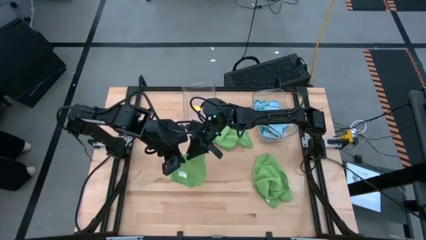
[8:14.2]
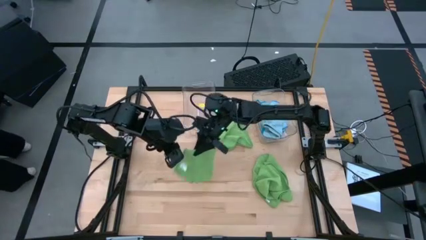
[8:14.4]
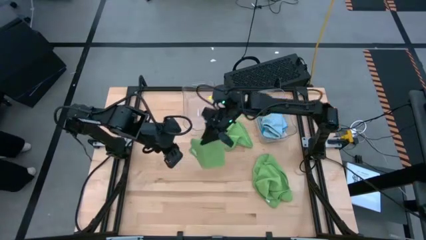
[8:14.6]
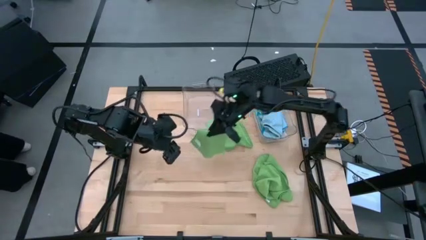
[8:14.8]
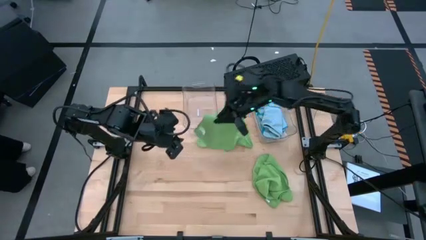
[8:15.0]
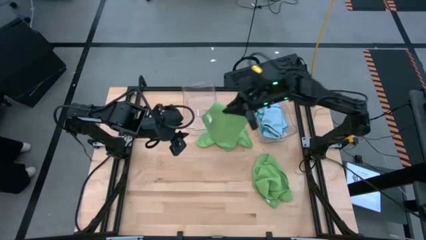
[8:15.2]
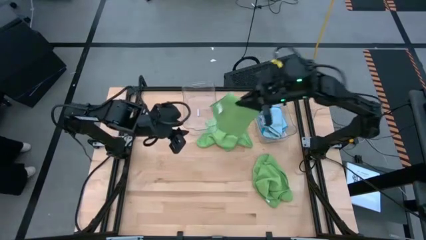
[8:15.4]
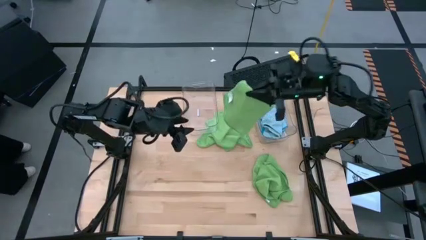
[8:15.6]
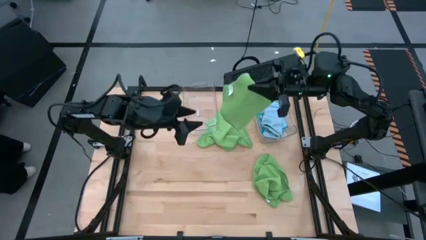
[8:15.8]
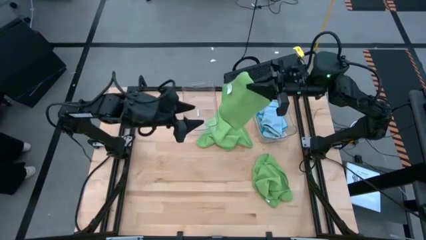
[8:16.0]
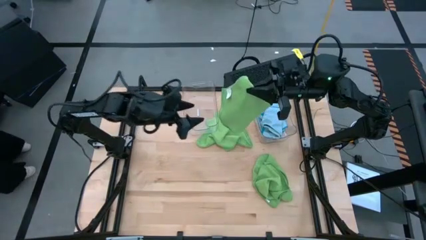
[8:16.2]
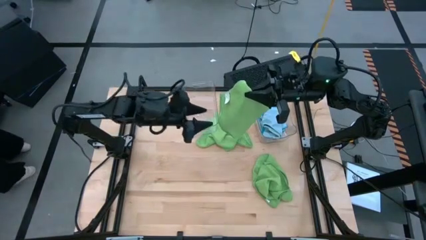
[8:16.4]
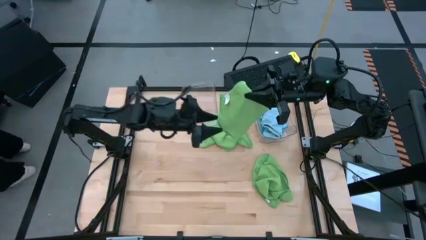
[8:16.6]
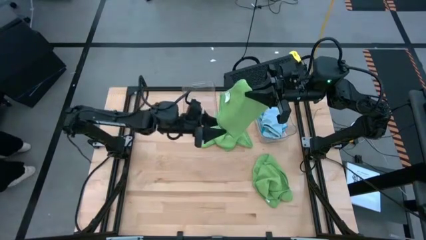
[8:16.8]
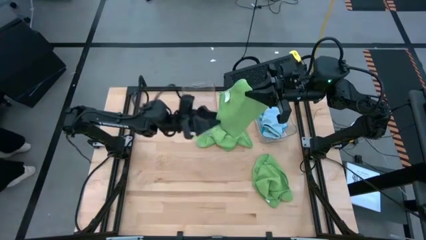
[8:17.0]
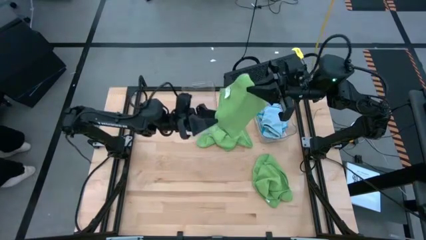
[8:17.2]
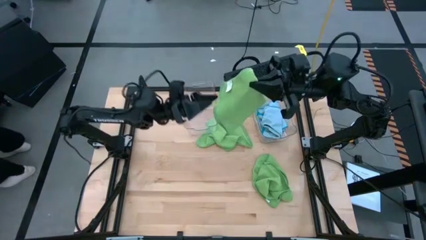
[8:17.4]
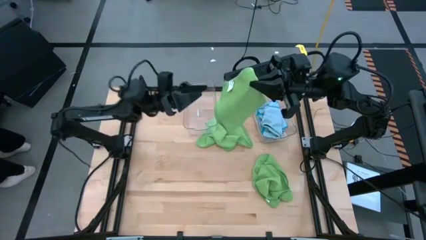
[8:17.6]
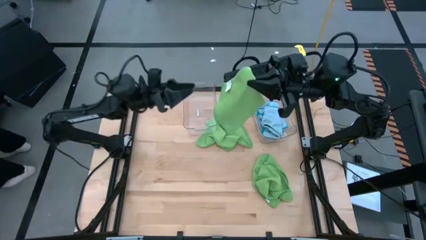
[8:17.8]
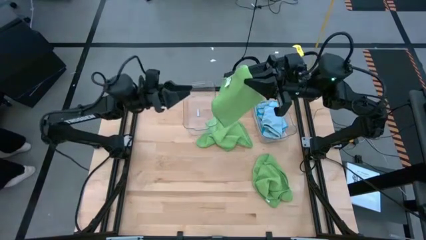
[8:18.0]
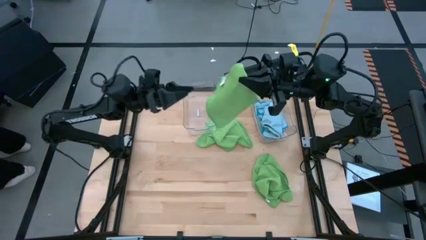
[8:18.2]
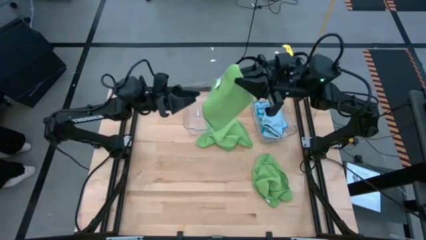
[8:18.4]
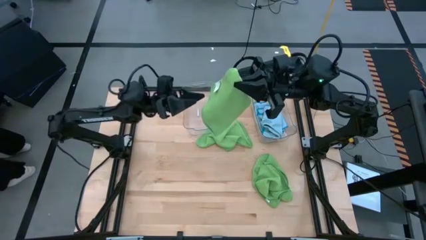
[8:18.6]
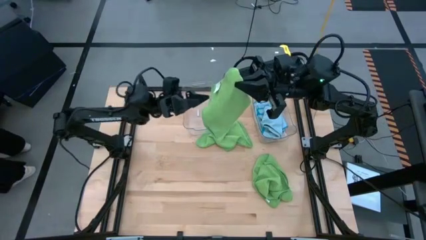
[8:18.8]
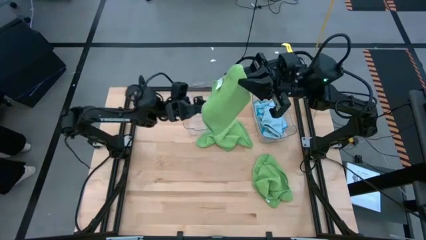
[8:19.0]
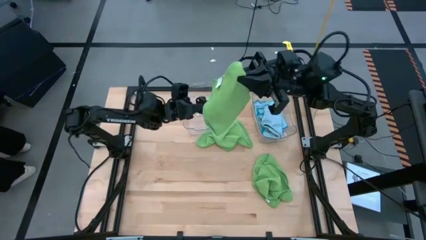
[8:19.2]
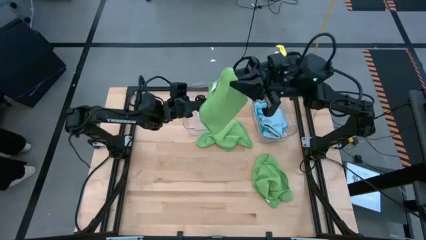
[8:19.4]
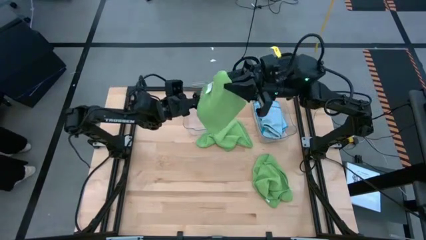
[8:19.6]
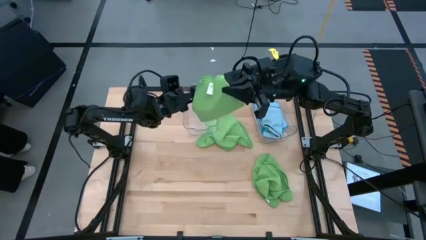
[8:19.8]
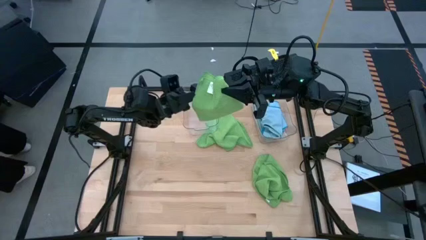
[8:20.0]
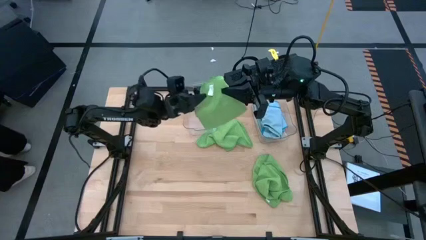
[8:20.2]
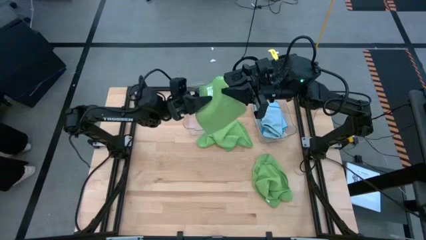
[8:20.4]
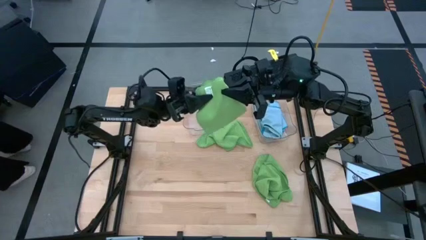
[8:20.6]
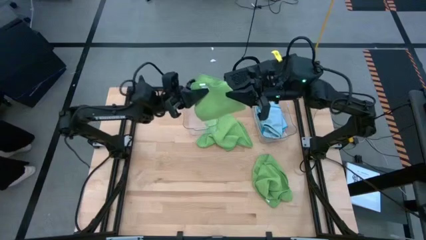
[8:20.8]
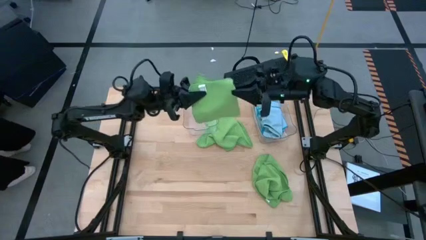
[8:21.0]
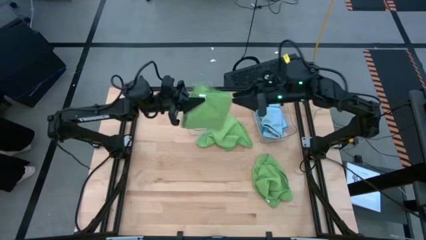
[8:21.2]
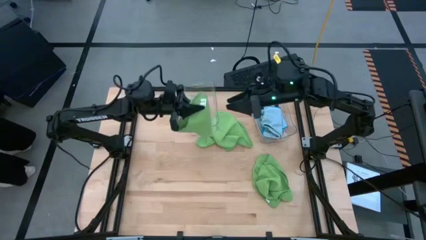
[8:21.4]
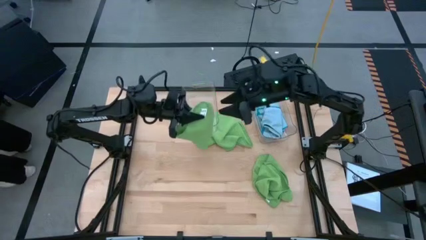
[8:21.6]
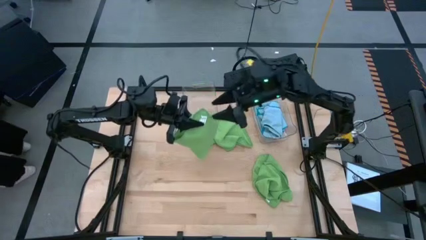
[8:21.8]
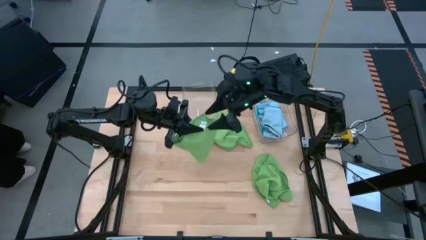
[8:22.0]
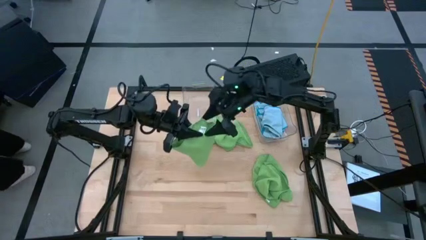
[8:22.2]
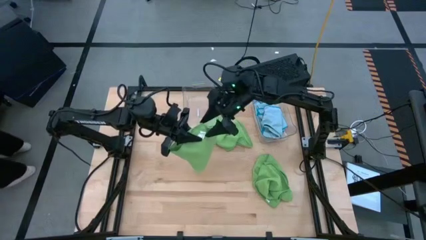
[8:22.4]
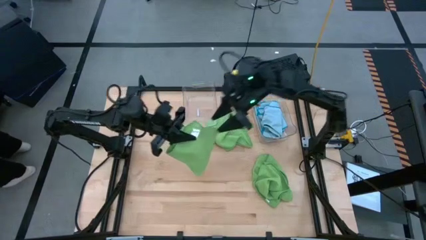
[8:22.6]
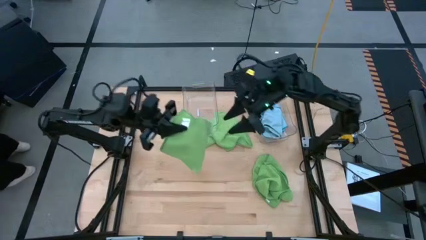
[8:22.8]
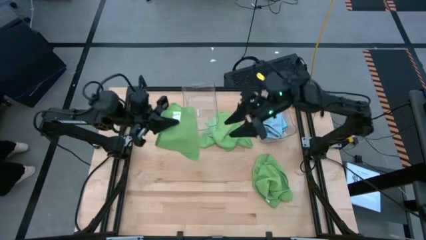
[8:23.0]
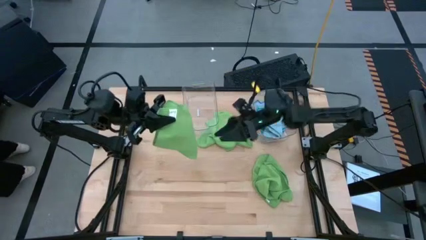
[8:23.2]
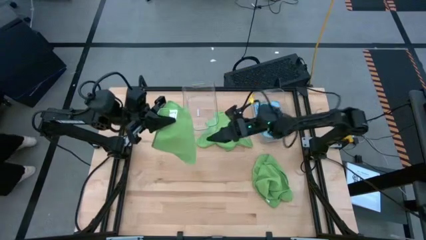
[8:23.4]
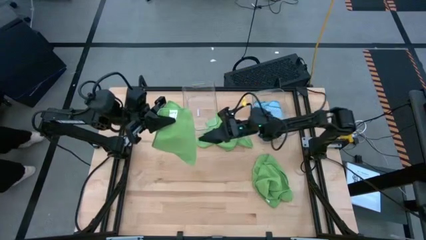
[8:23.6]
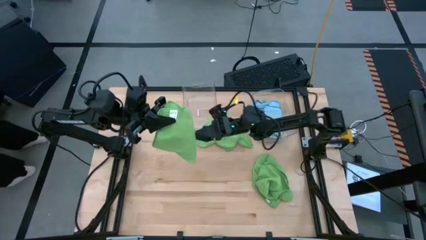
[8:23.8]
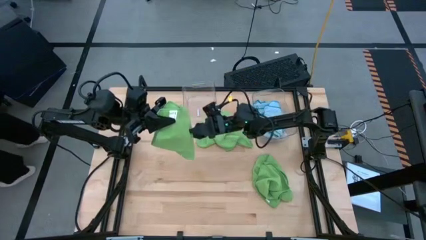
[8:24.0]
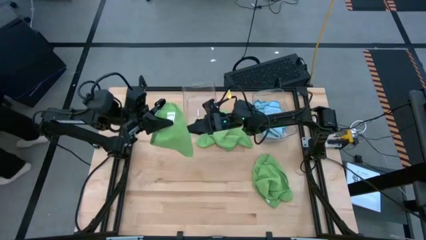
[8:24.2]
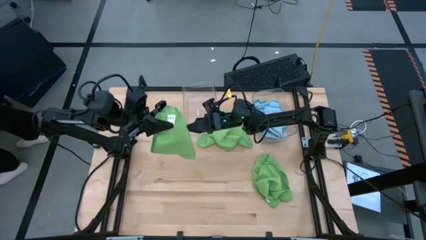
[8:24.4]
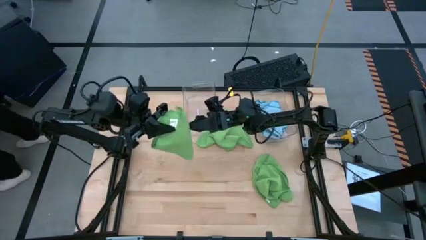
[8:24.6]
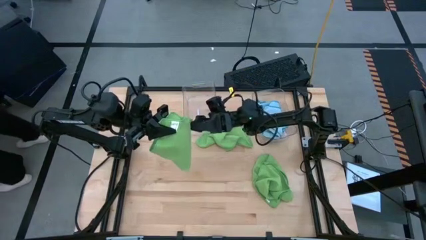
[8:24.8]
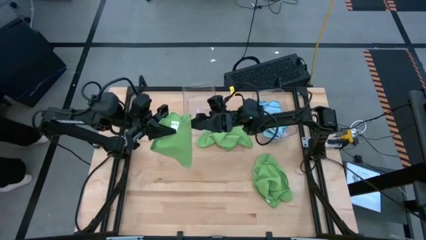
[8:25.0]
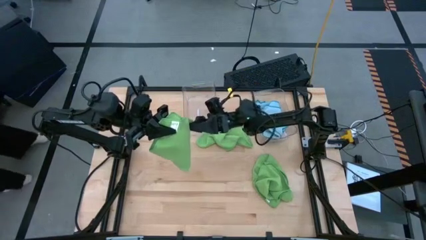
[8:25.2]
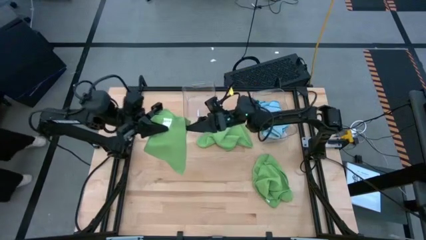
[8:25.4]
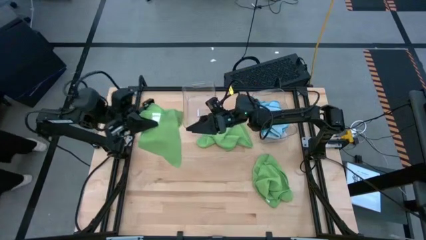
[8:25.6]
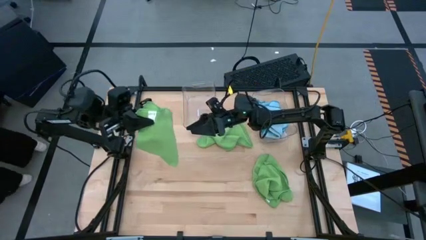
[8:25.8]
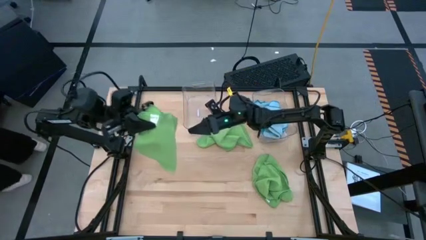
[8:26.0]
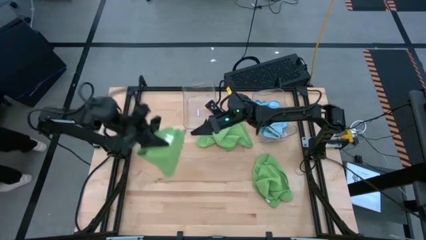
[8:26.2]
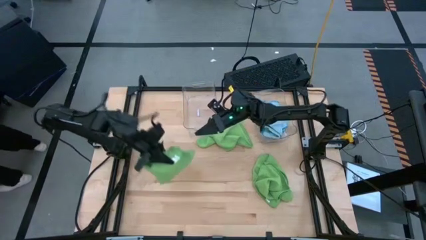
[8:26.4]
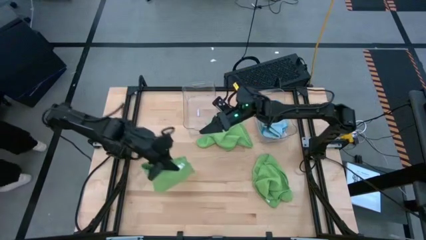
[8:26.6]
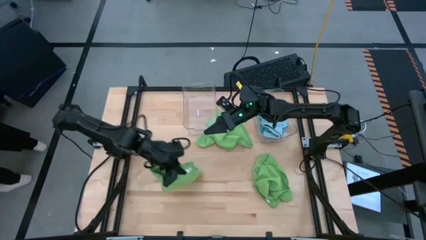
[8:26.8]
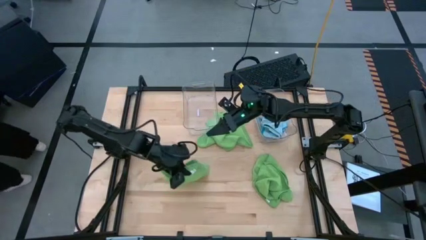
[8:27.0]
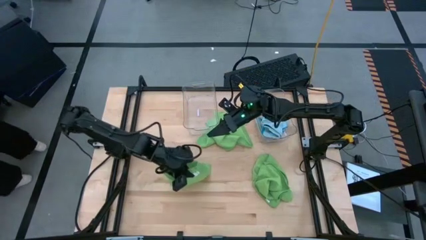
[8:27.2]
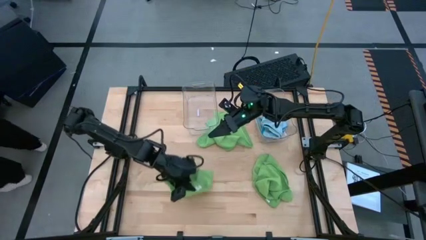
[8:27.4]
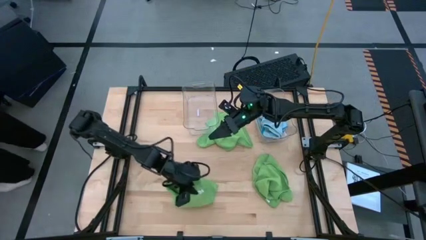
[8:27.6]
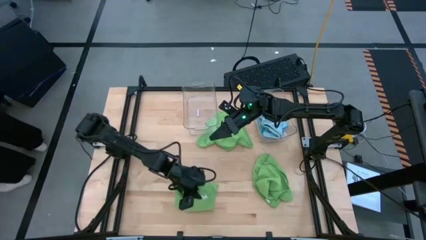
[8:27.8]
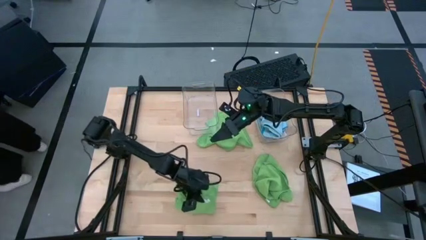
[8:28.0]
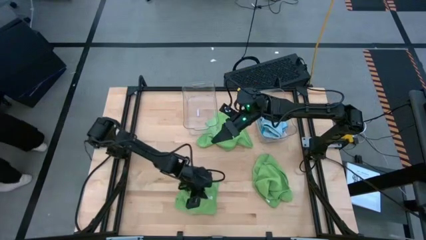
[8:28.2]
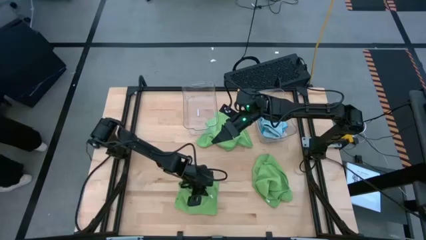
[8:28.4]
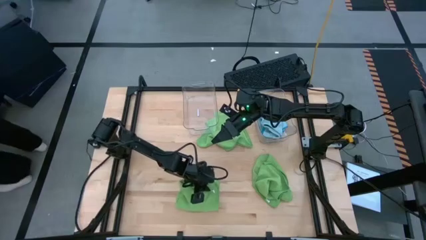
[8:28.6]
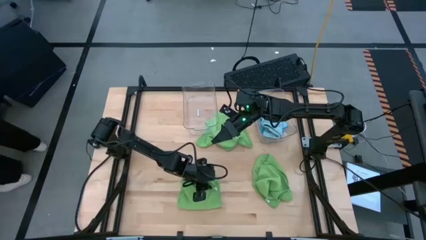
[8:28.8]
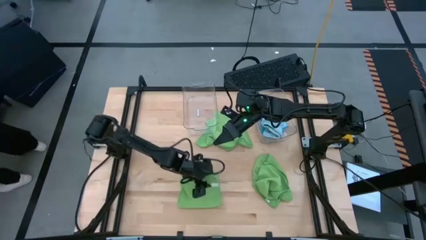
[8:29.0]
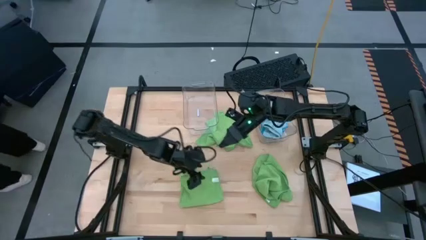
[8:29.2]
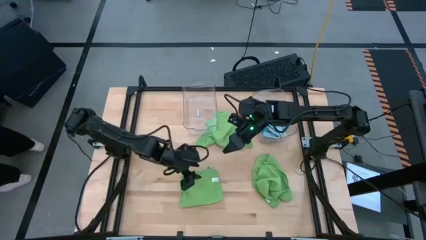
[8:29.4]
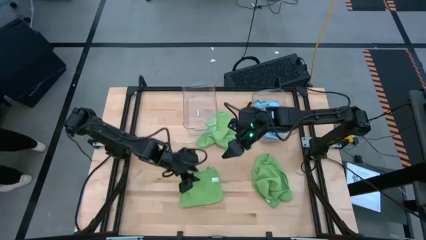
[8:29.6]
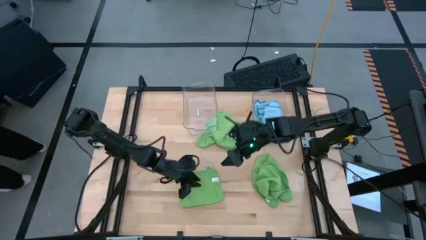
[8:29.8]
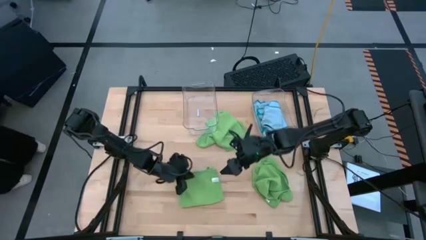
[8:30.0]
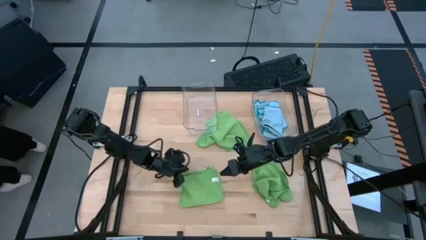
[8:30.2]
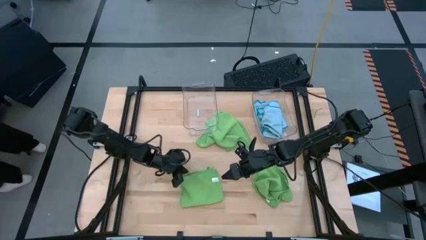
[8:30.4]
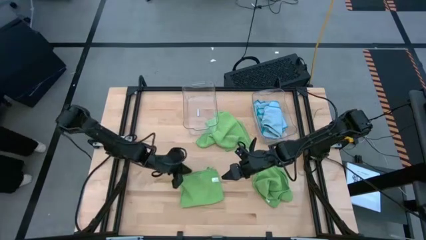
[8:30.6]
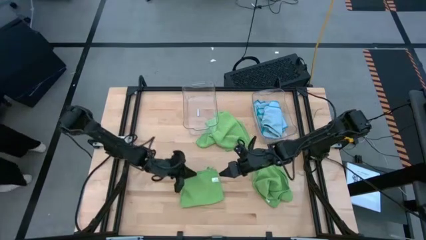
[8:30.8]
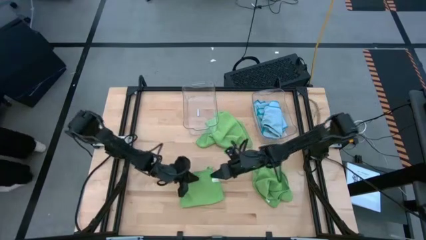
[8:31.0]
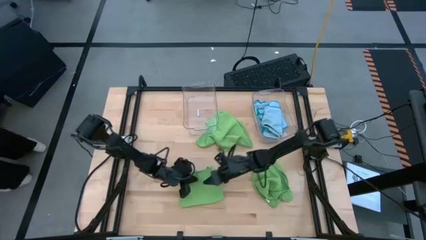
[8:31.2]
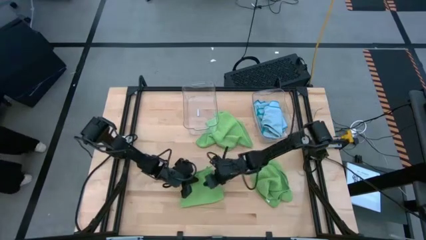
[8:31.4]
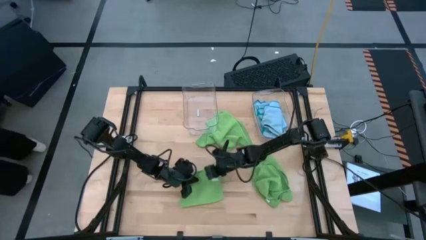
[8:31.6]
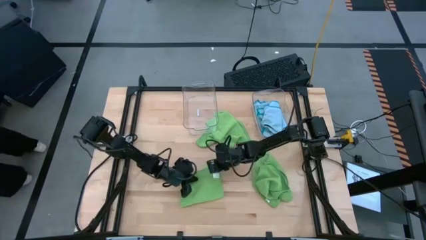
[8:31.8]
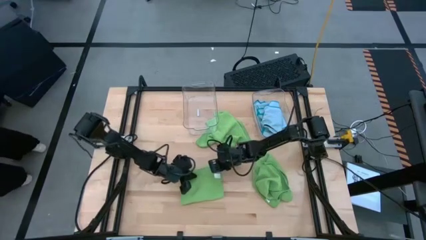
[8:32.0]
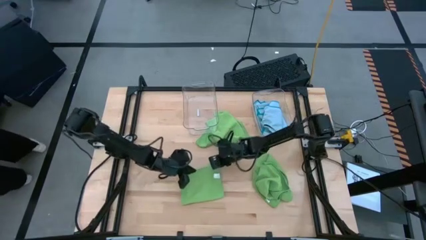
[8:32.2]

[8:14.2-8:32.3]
Task: Fold microfiber towels
Fold the bottom left green microfiber towel
